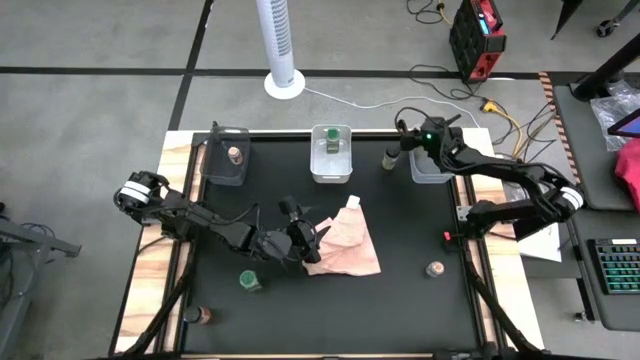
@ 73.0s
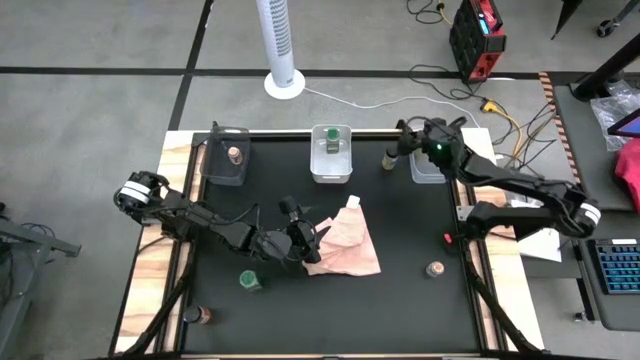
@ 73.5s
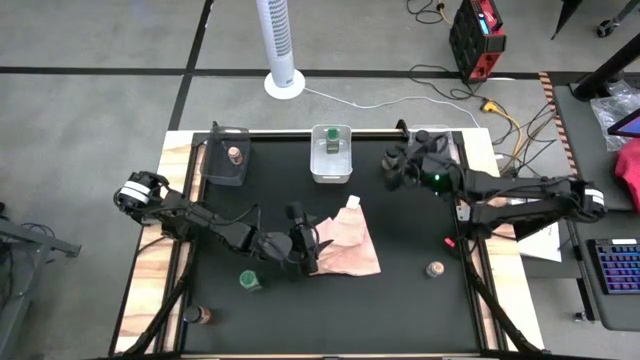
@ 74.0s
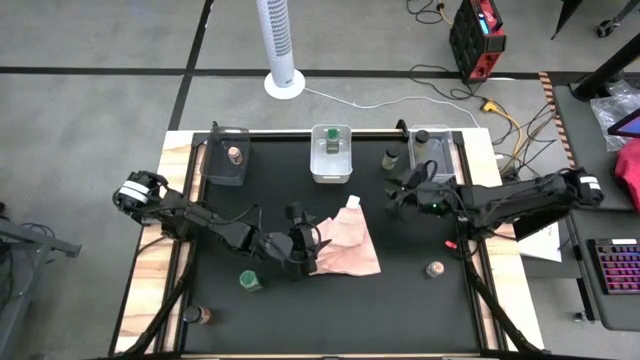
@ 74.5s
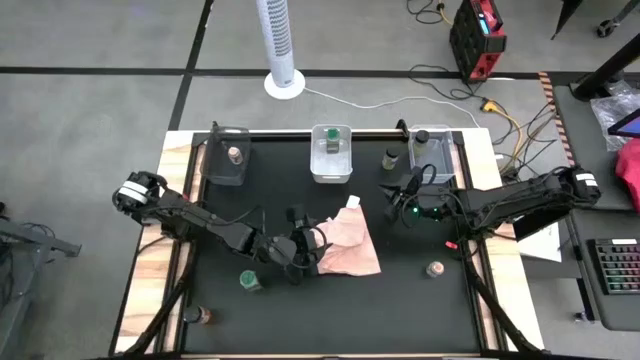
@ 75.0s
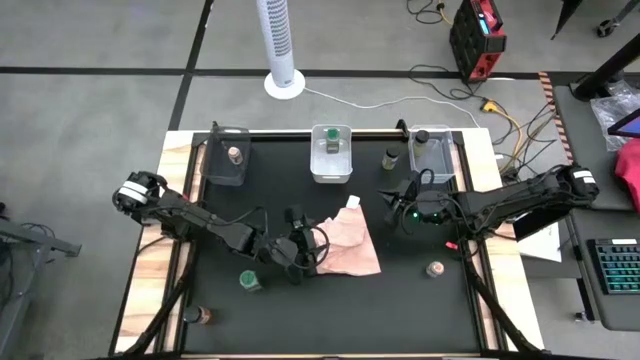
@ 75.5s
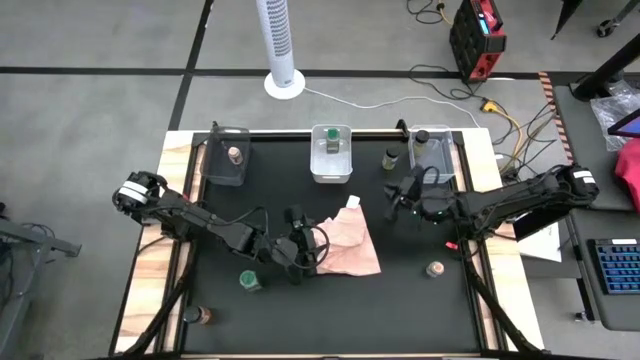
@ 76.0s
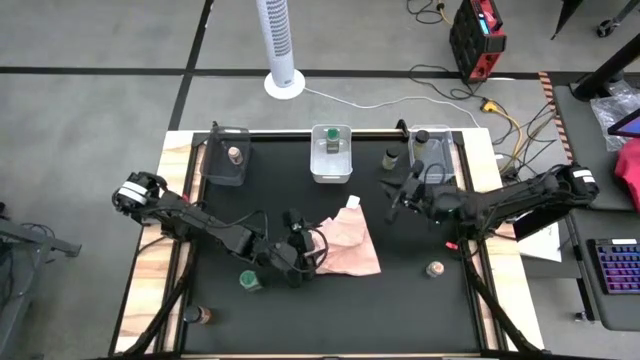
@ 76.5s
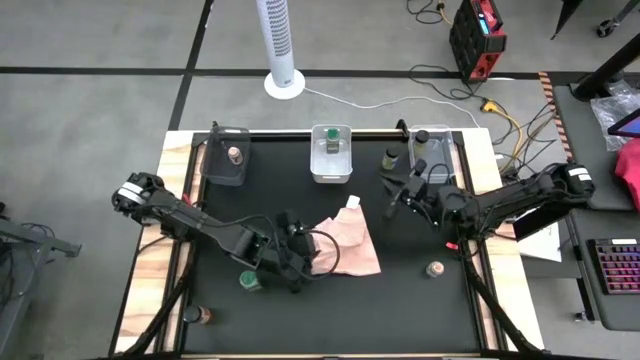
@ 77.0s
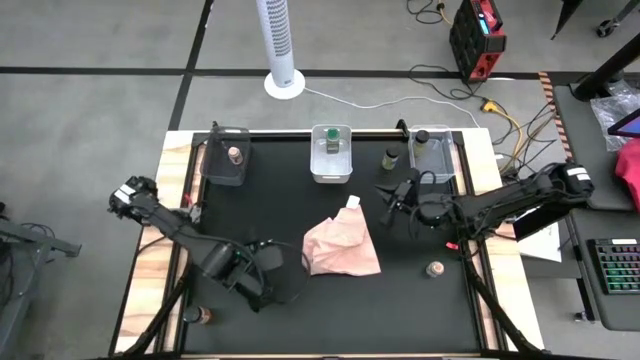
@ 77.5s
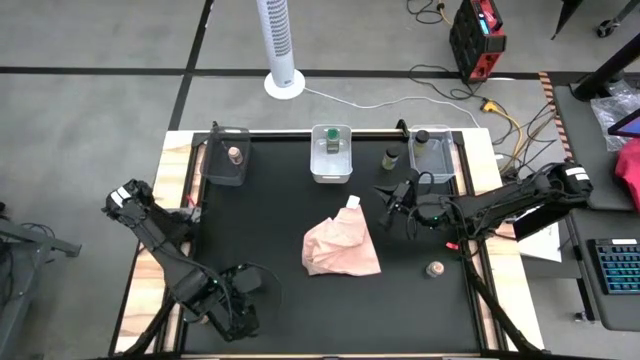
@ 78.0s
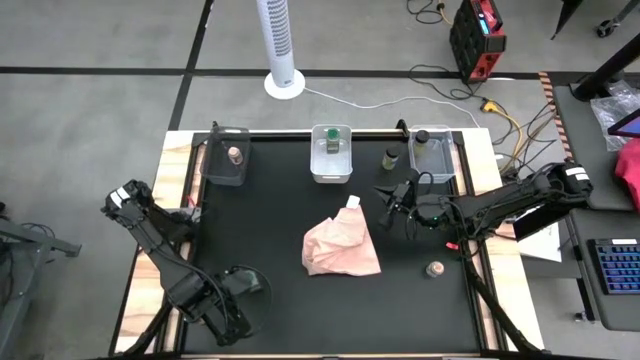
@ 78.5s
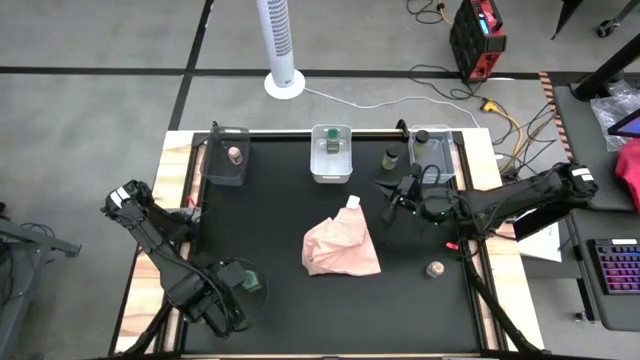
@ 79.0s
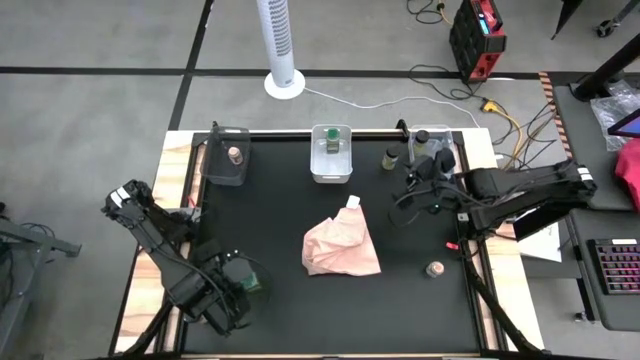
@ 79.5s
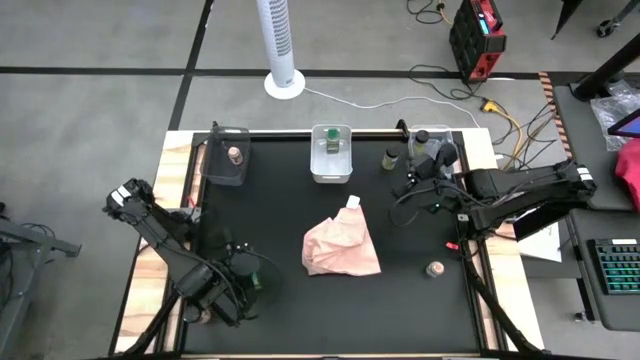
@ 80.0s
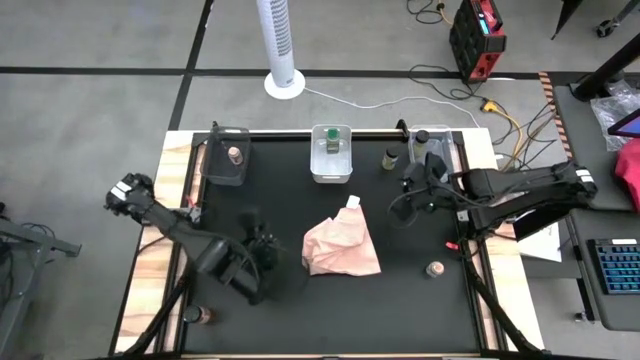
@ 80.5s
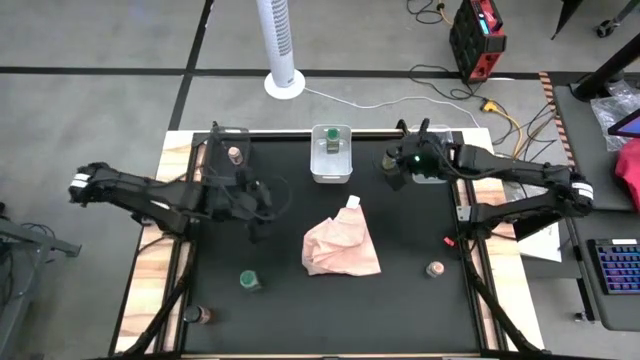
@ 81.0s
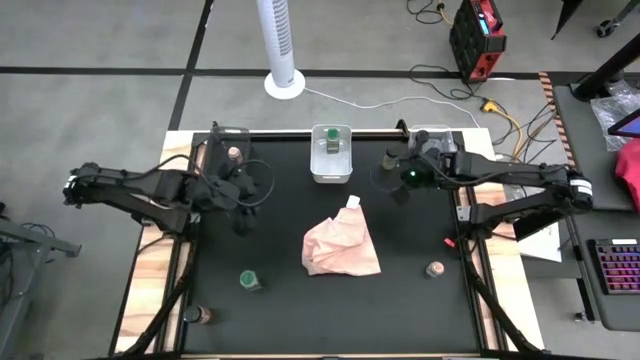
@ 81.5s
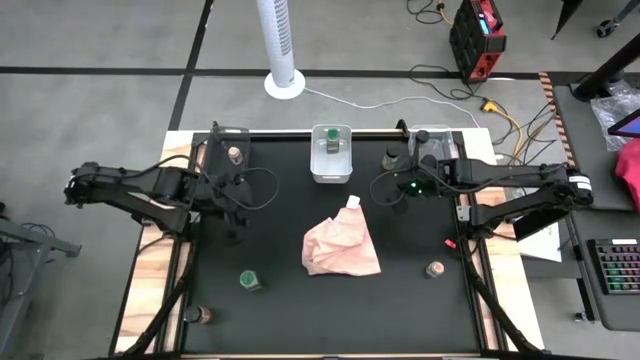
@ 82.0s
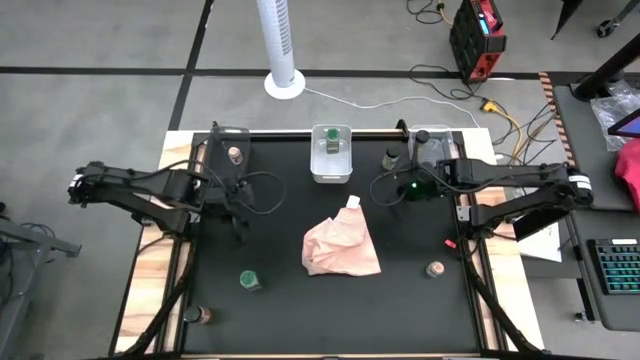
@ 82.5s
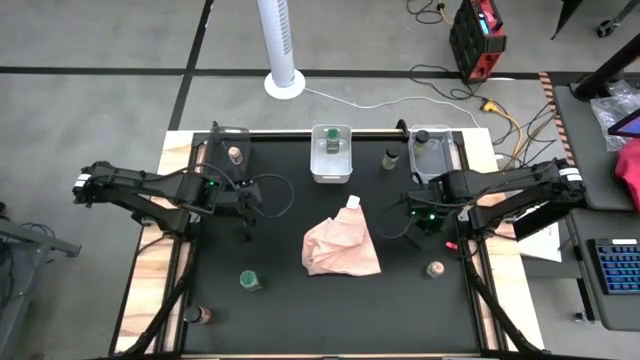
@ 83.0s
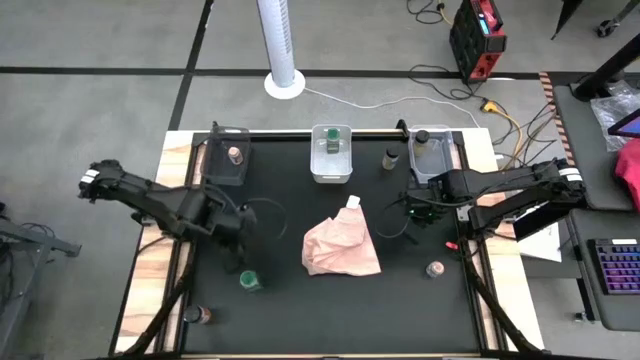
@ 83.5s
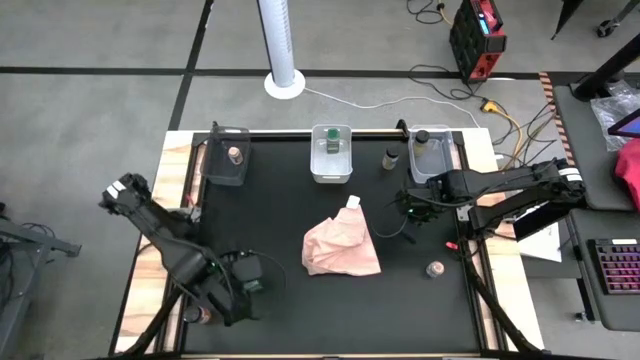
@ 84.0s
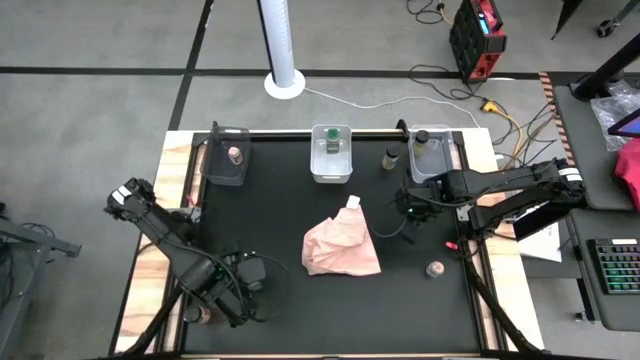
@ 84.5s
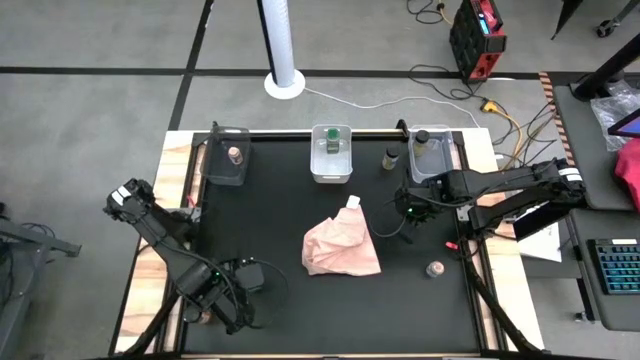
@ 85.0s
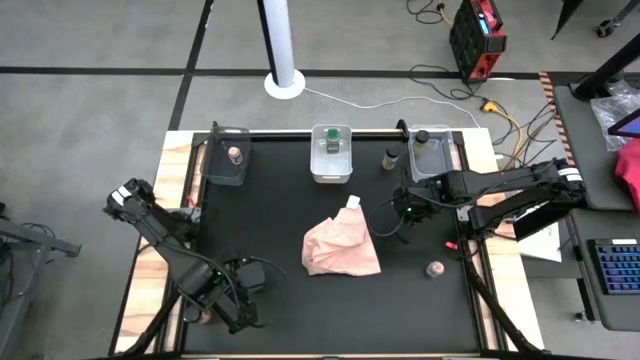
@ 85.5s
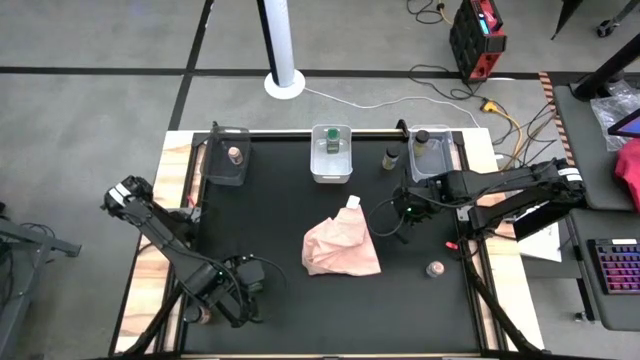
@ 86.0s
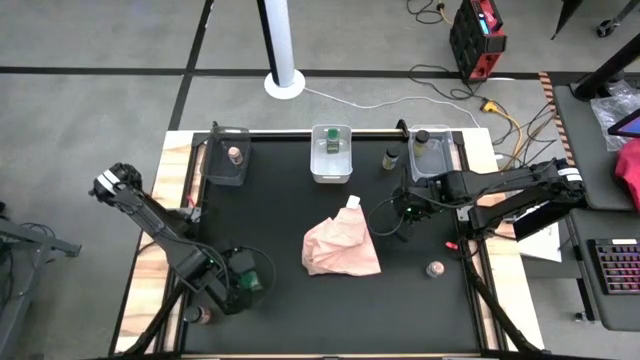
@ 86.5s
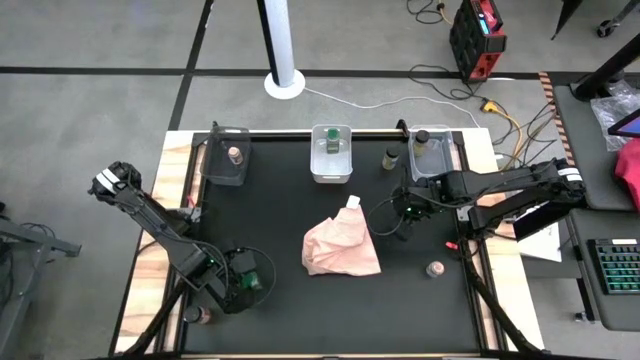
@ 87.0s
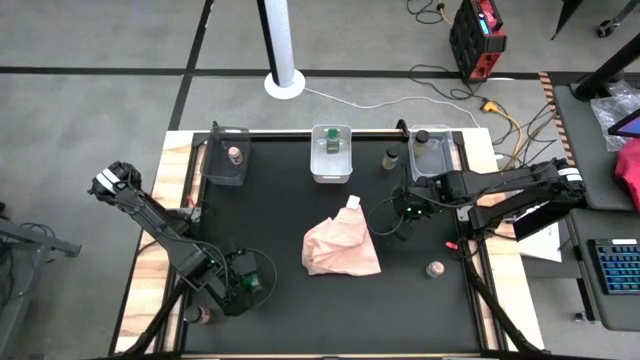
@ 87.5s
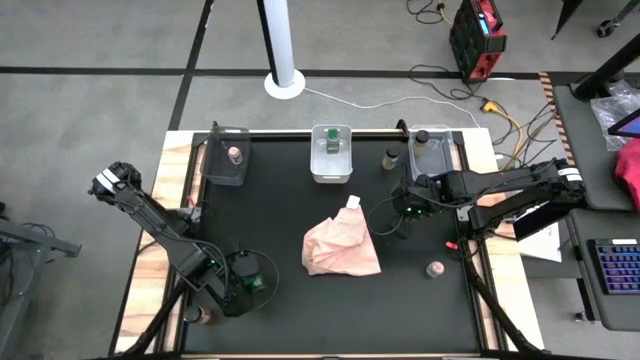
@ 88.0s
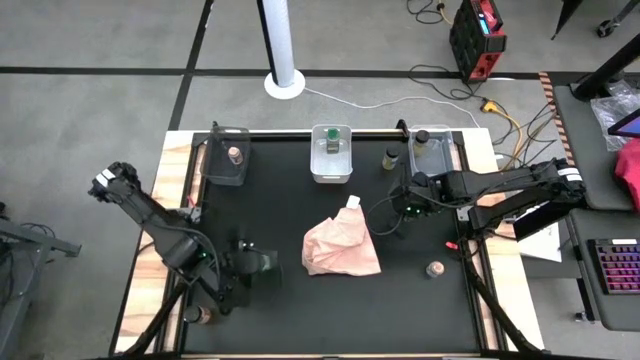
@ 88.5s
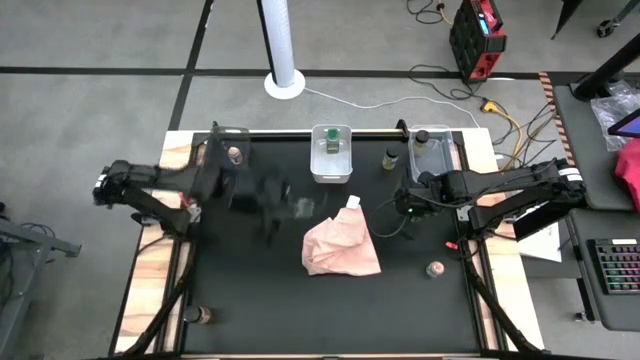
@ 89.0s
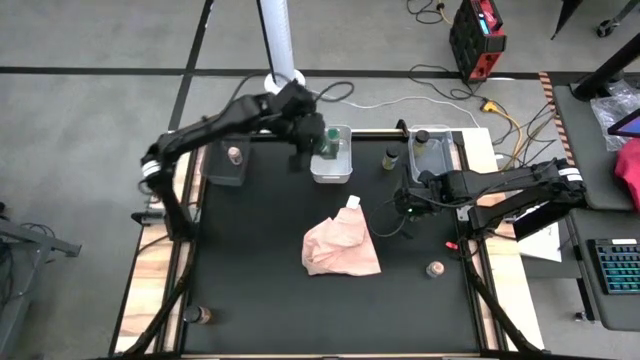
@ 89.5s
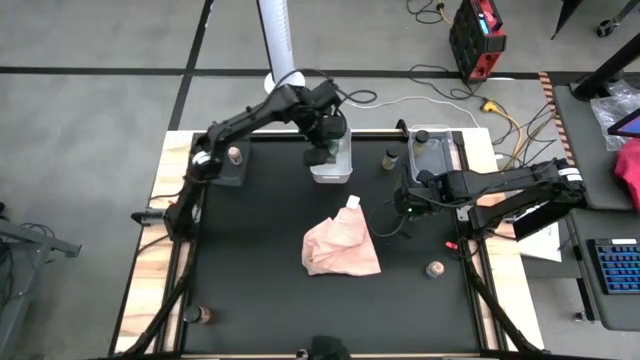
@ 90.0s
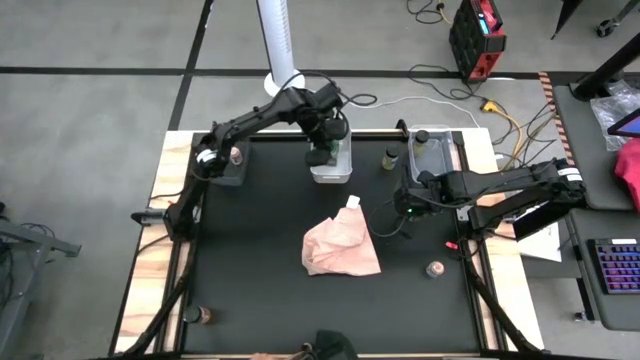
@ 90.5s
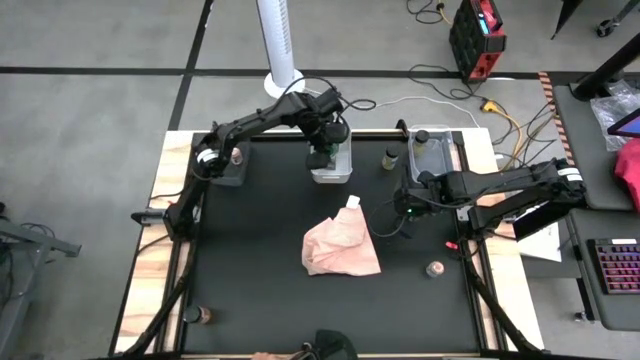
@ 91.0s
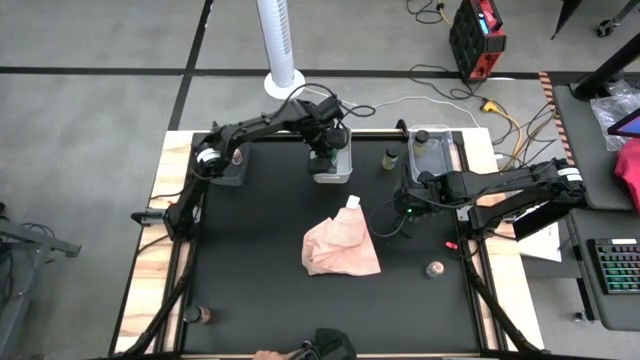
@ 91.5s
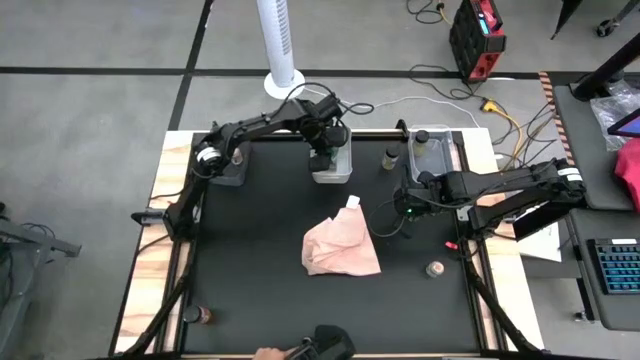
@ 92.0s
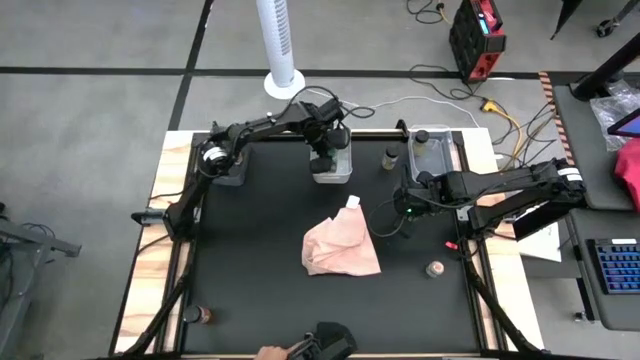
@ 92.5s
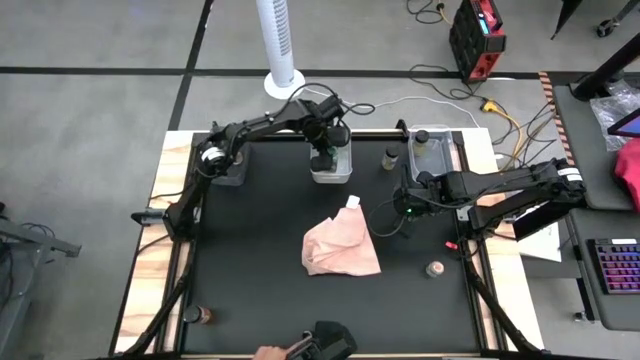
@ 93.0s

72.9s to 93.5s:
Task: Sort spices by type
Put the green spice bottle into the white bin

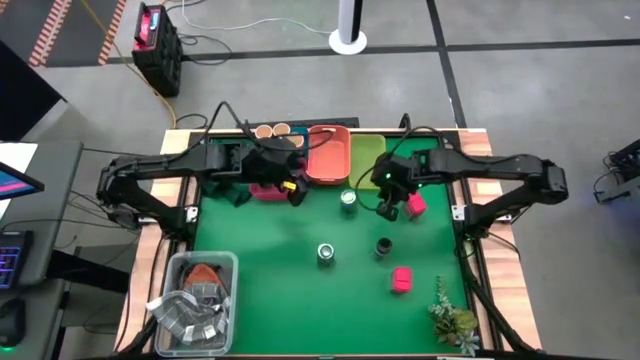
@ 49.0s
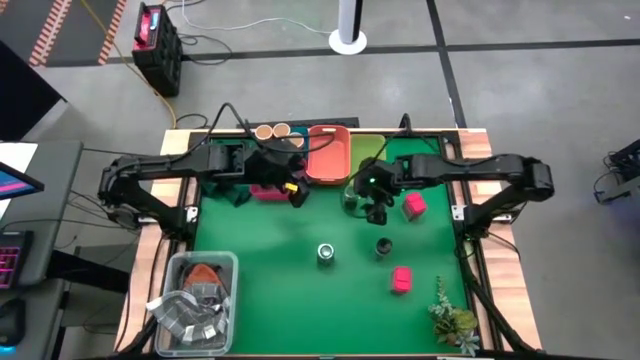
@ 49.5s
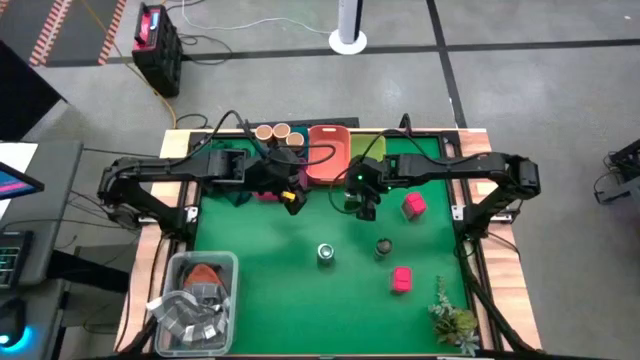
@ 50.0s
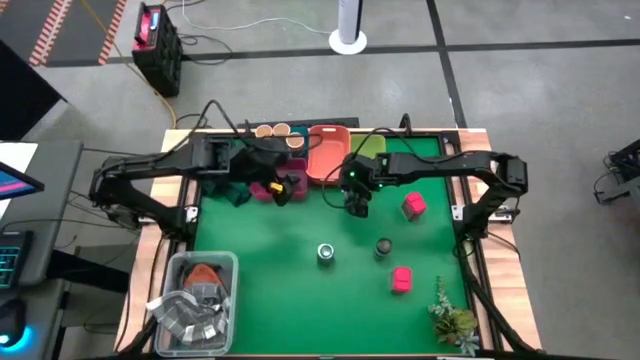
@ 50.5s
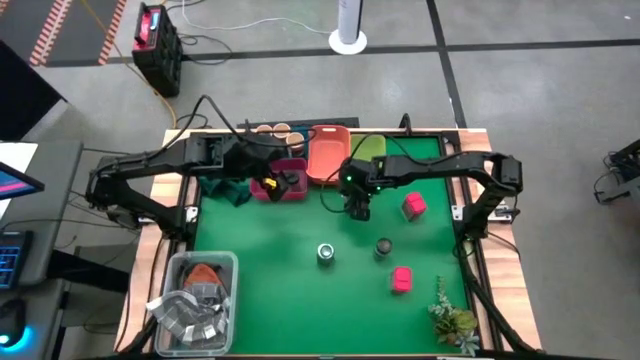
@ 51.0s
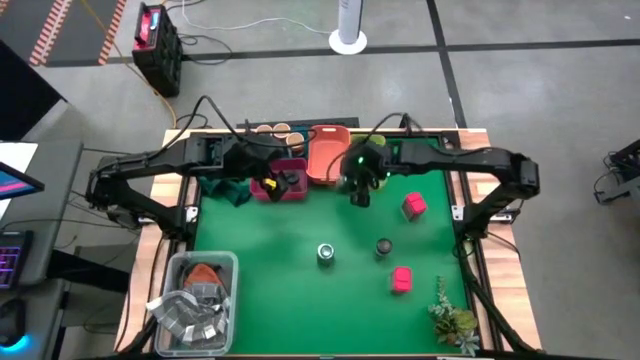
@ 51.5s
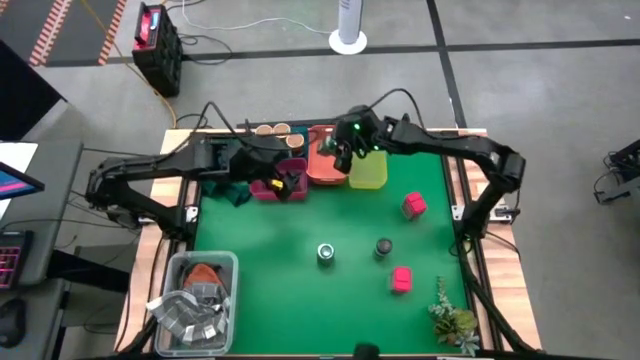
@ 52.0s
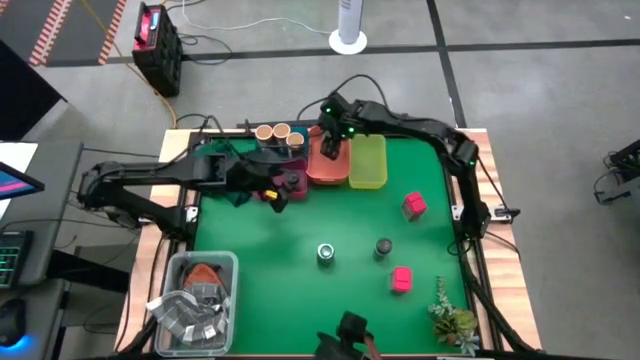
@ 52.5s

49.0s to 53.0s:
Task: Sort spices by type
Put the top green seasoning bottle into the orange bin
